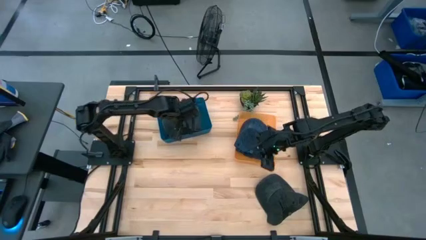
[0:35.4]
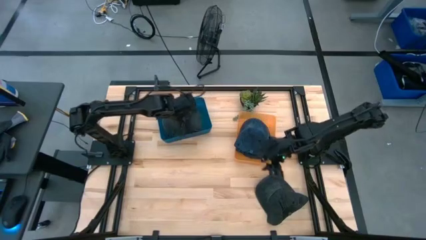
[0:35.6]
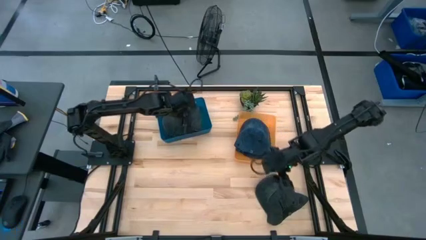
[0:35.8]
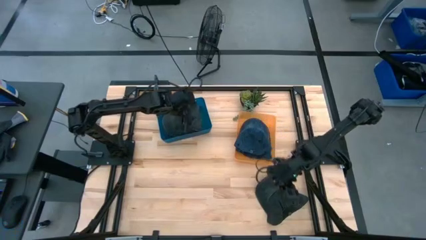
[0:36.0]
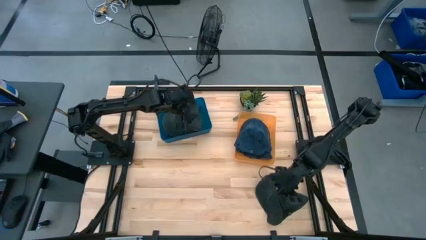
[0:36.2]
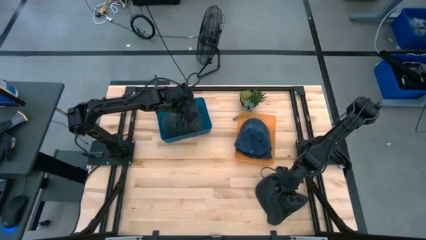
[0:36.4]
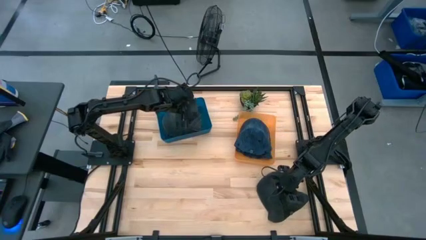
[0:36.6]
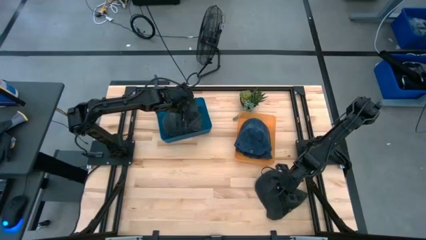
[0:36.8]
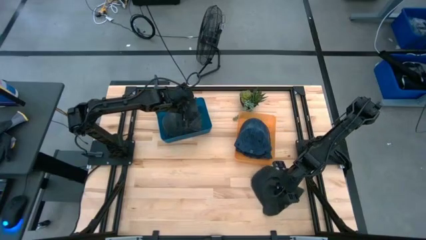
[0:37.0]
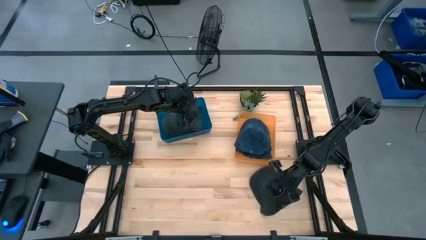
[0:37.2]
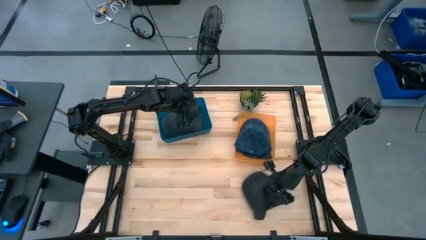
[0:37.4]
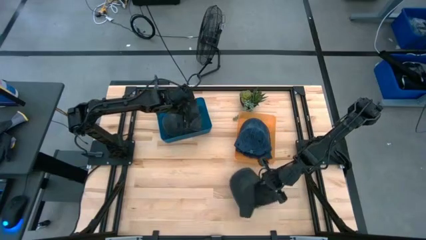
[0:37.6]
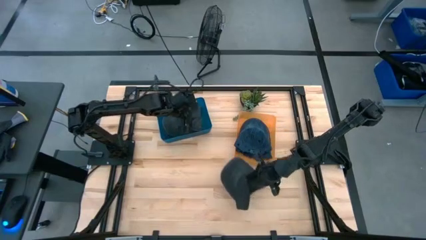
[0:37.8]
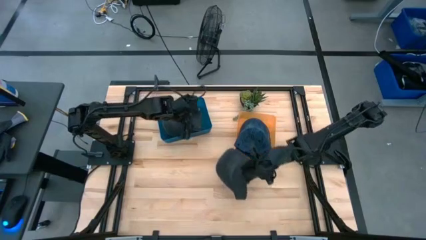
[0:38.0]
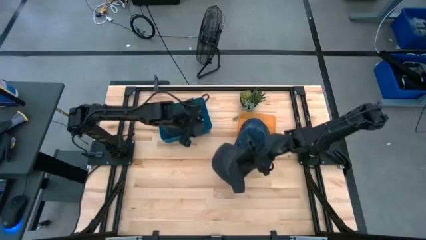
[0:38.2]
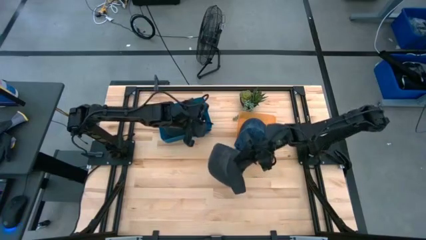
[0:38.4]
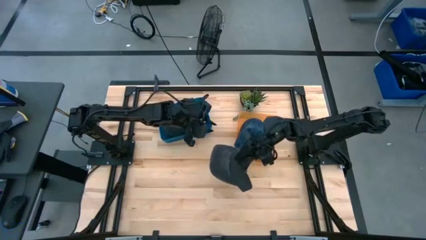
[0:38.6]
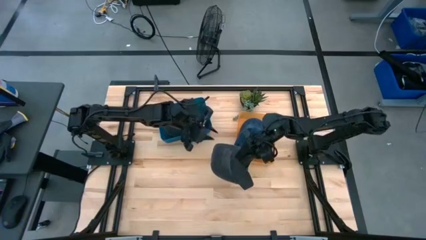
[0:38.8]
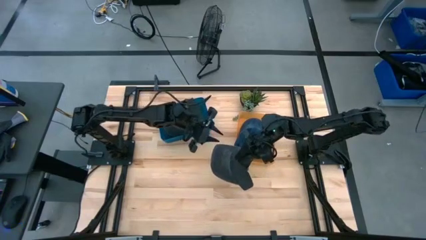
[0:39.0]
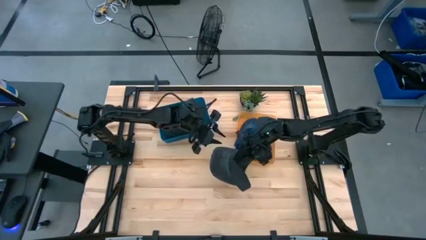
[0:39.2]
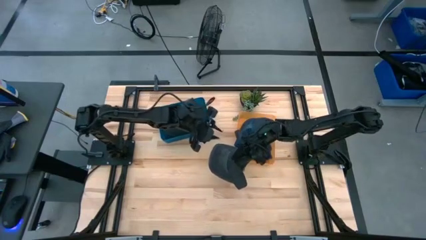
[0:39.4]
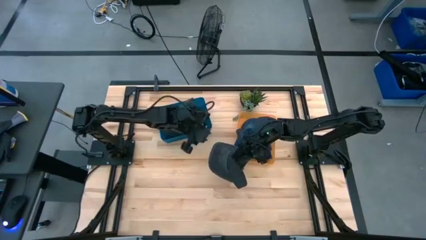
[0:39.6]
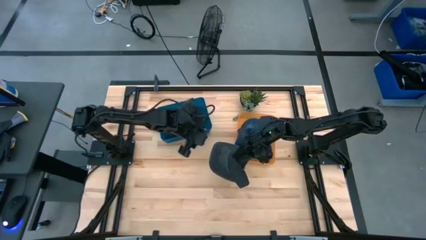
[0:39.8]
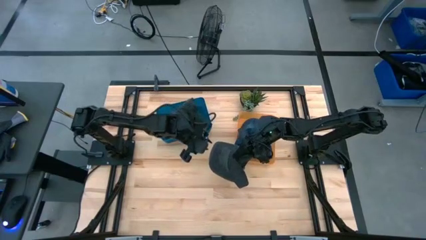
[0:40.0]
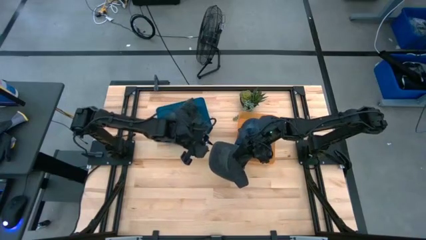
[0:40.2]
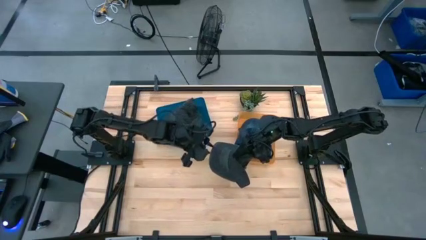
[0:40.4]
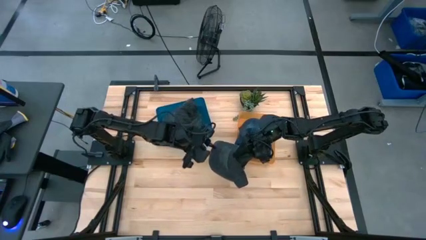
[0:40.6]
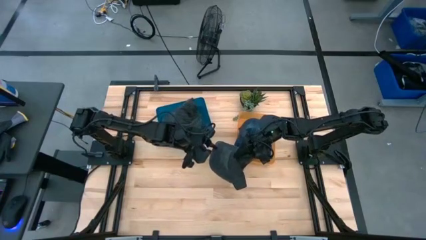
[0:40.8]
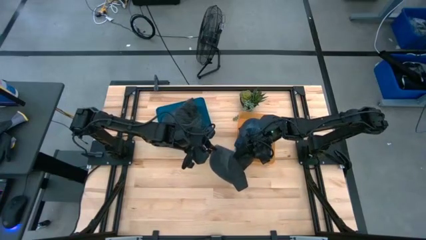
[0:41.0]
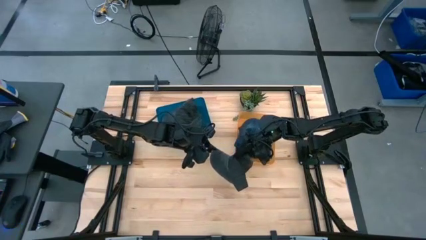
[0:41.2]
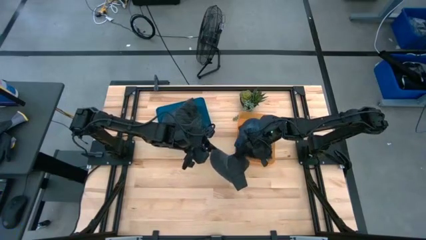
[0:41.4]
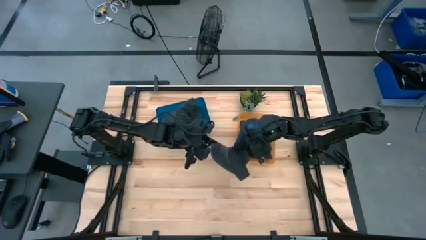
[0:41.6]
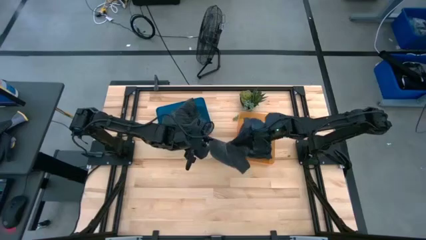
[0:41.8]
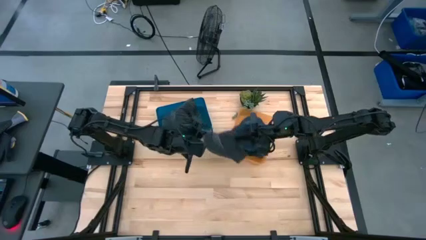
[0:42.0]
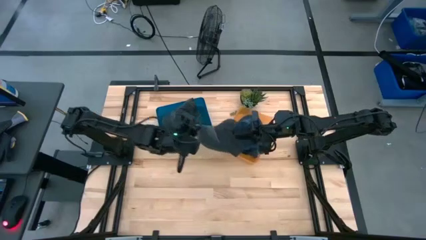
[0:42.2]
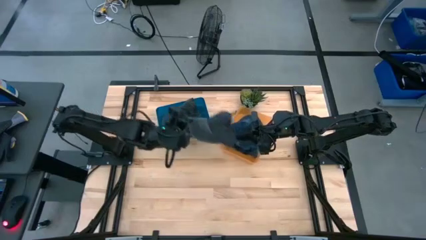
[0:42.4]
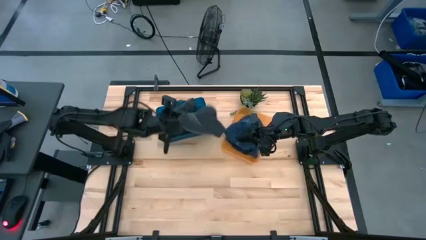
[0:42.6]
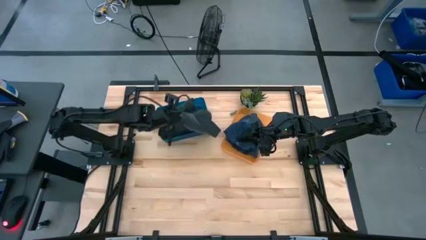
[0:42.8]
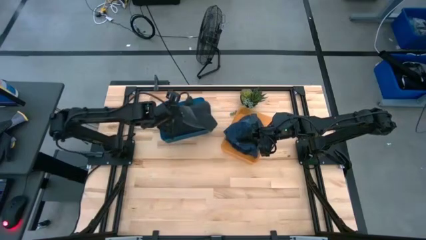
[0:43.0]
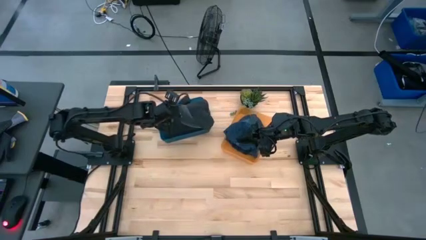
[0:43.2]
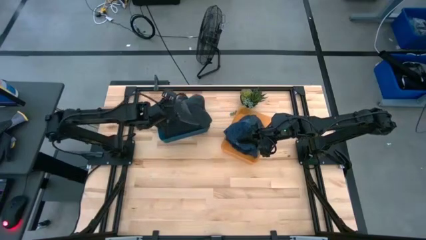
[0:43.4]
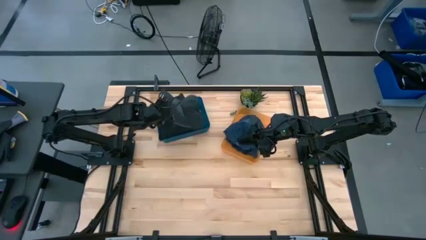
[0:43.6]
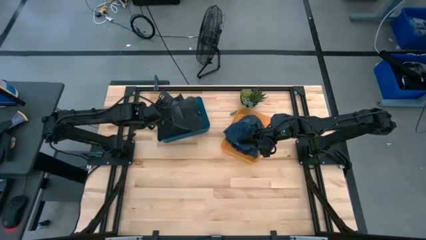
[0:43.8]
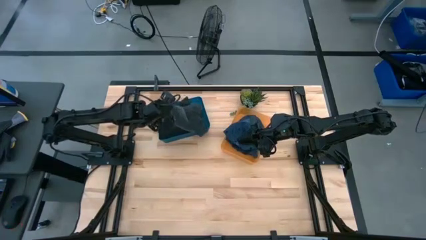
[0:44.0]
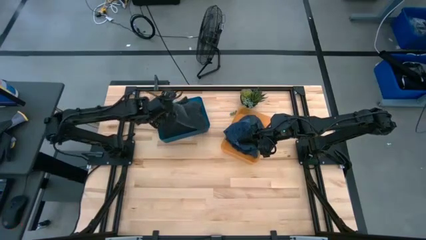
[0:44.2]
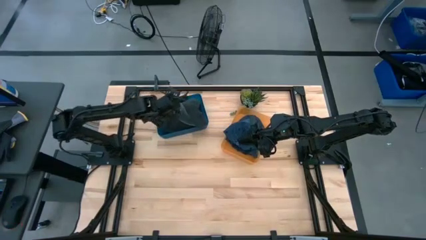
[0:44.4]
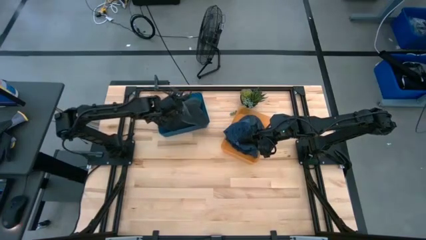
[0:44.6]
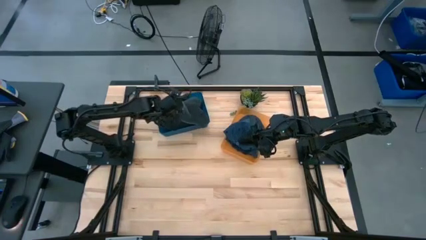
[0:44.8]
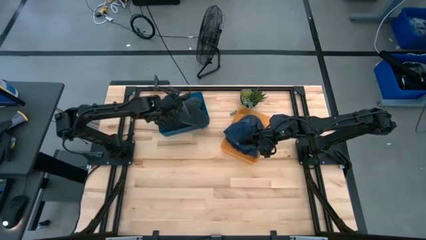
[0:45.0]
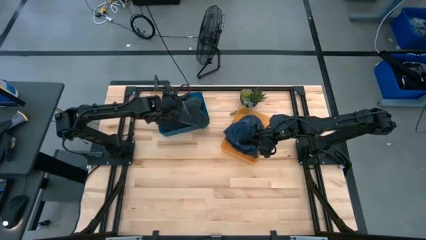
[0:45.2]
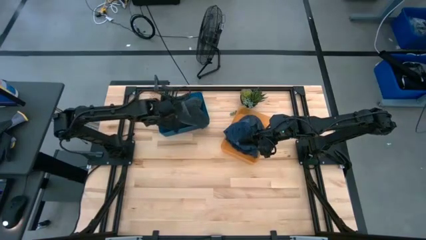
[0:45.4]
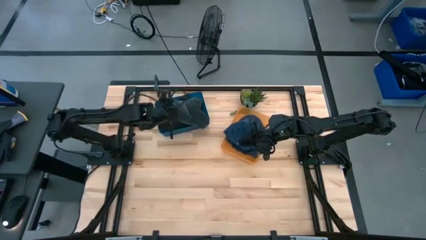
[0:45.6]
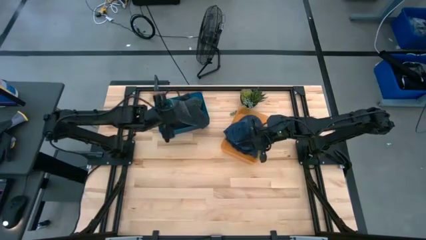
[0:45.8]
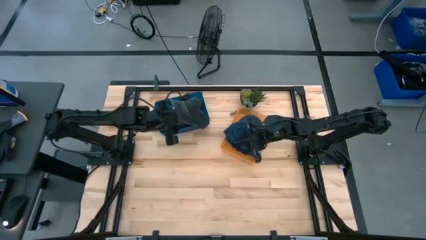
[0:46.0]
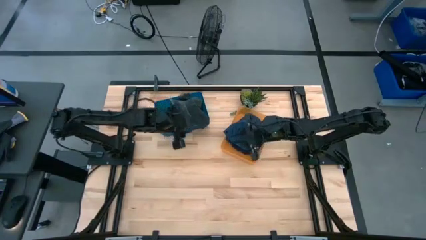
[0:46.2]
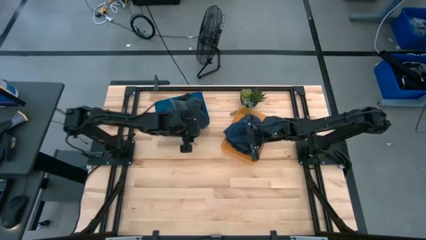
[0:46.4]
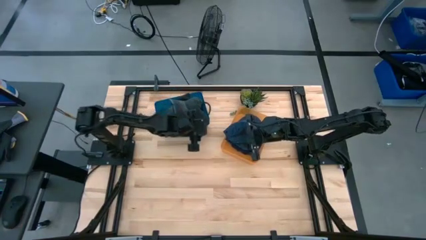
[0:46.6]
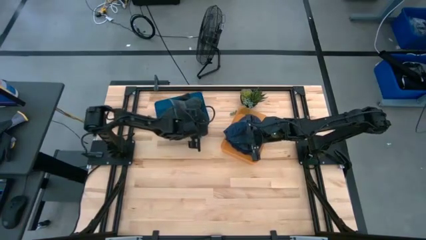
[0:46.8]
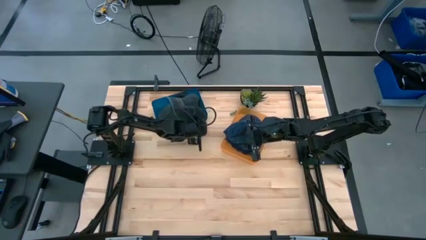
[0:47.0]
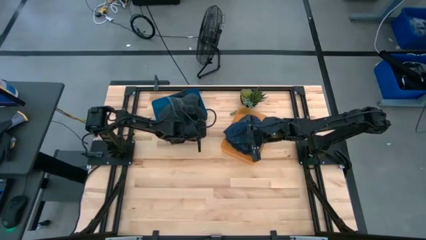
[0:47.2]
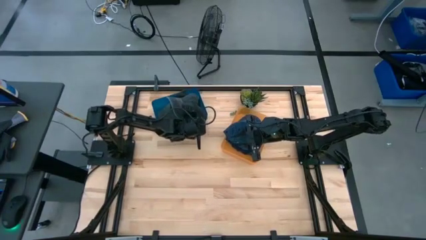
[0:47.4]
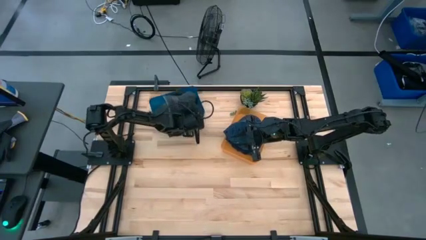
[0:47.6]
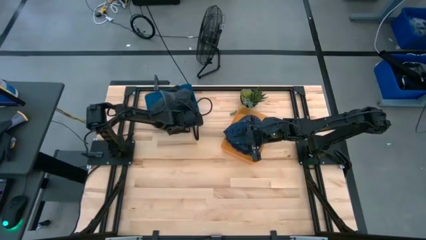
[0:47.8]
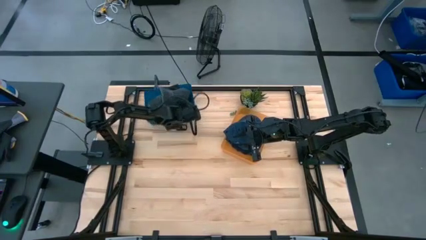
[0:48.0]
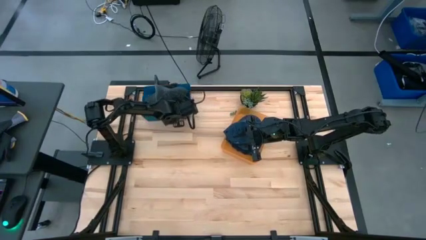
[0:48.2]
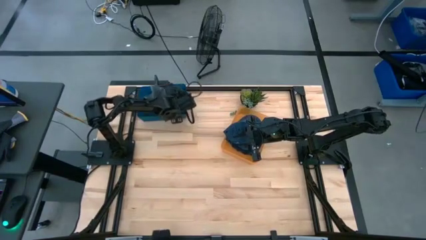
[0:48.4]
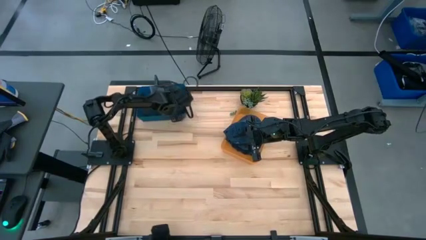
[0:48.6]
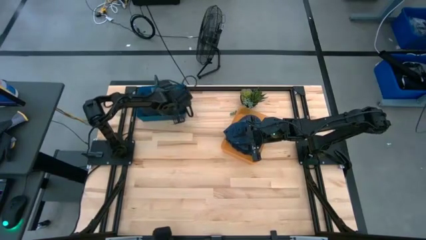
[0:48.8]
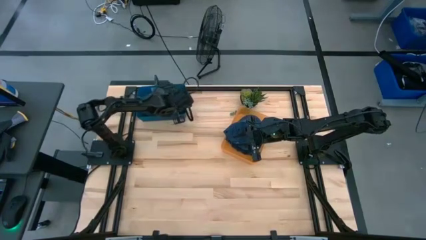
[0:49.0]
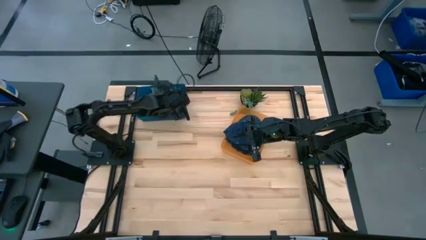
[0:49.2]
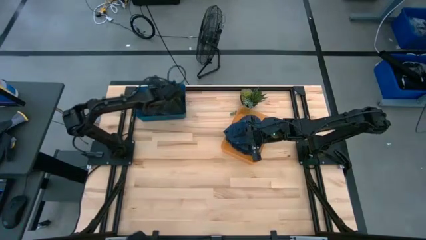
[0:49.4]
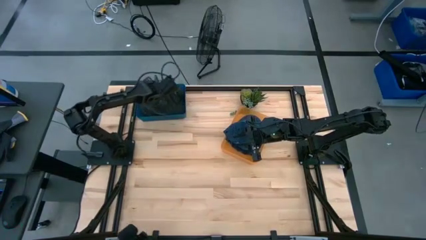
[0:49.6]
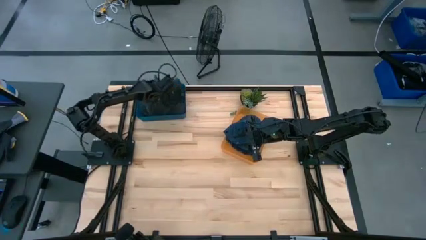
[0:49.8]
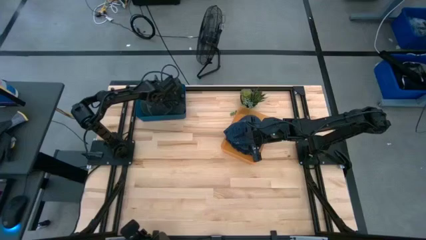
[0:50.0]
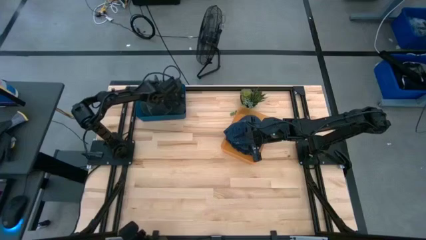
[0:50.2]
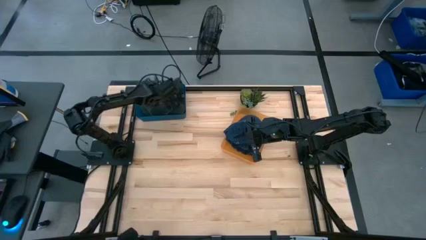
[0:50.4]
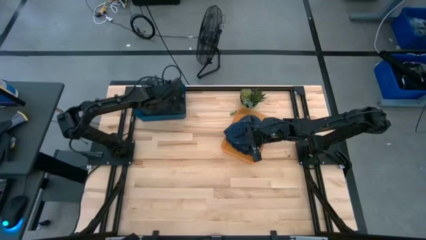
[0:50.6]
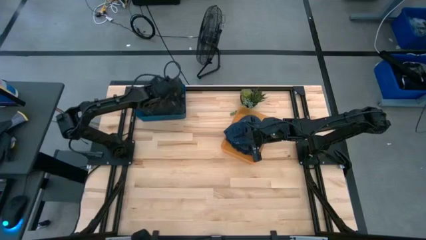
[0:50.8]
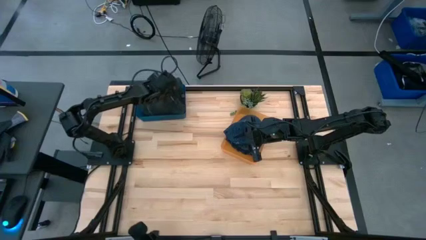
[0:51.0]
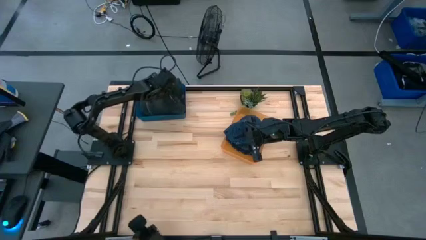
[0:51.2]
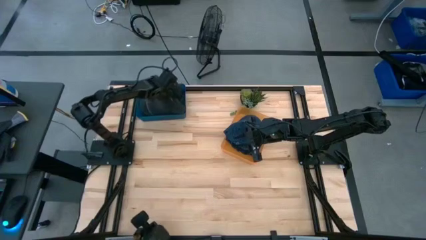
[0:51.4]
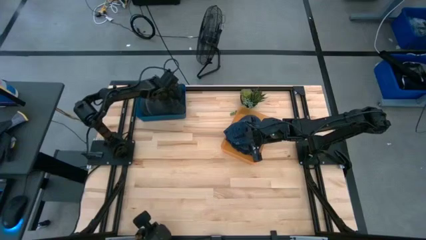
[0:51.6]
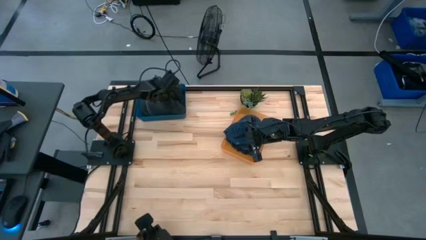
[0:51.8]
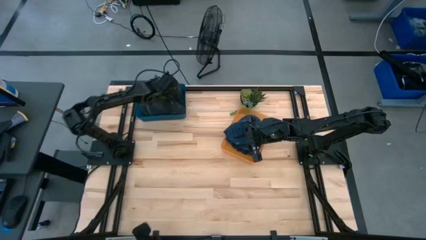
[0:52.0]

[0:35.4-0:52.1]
Task: Pick & Place hat
Put the black cap into the blue bin
